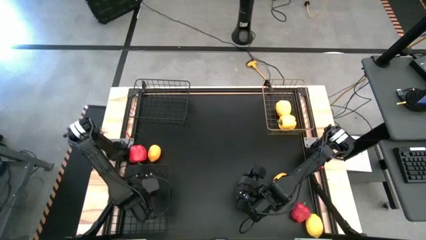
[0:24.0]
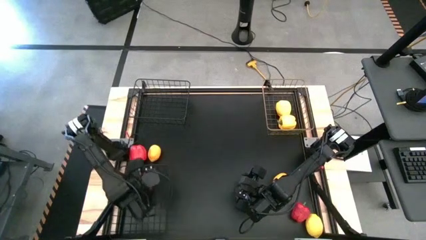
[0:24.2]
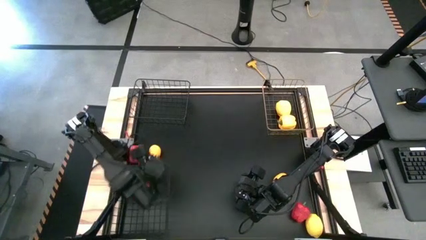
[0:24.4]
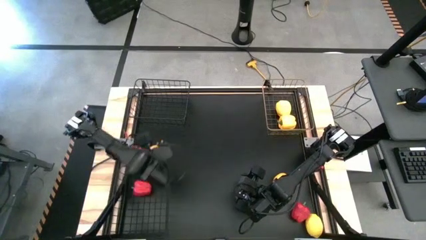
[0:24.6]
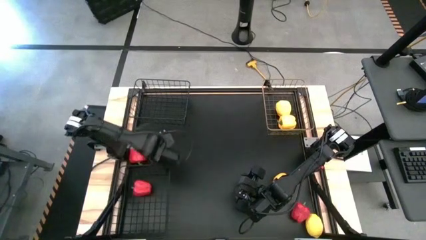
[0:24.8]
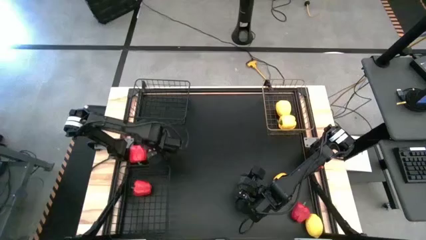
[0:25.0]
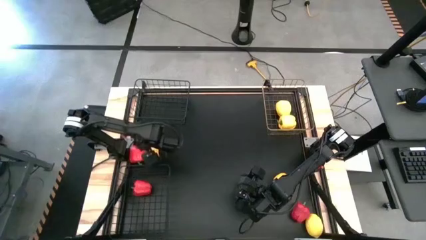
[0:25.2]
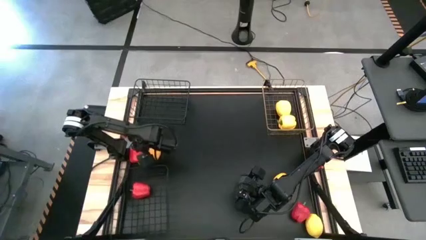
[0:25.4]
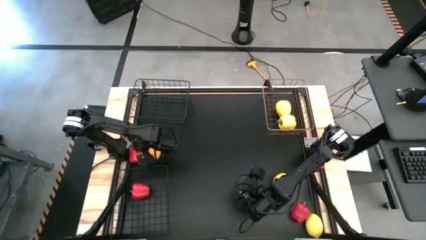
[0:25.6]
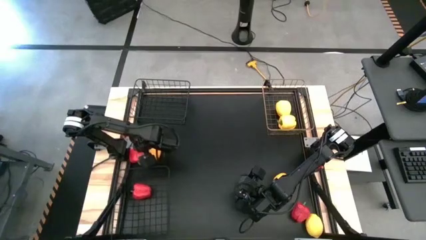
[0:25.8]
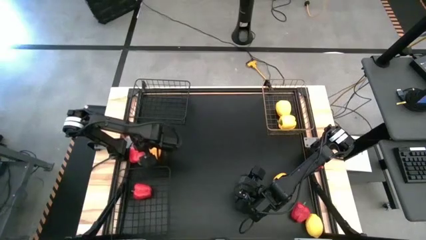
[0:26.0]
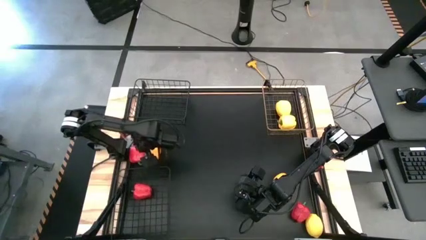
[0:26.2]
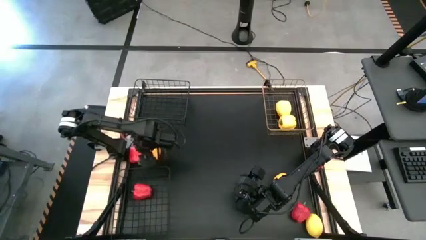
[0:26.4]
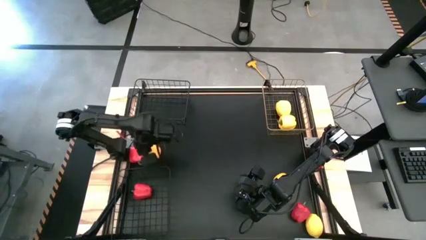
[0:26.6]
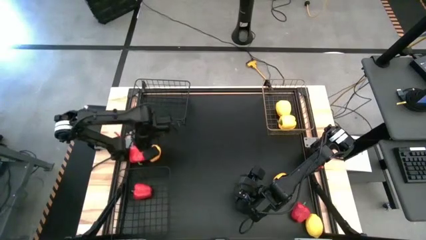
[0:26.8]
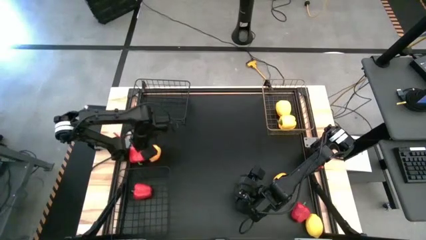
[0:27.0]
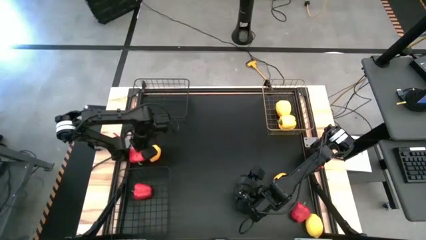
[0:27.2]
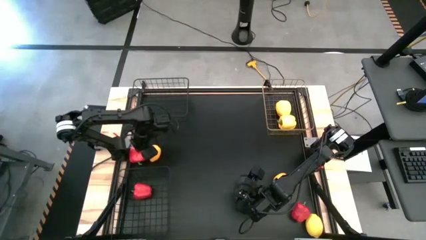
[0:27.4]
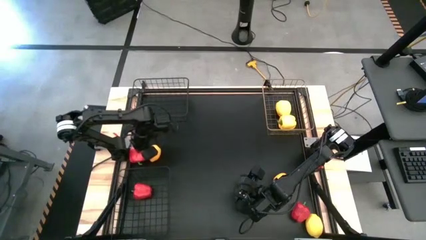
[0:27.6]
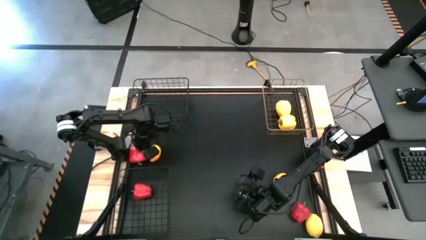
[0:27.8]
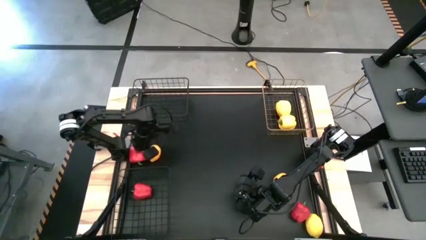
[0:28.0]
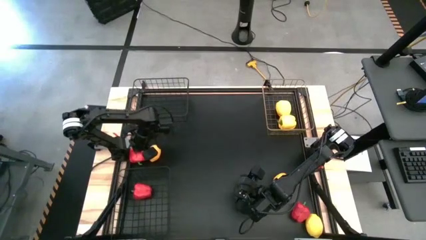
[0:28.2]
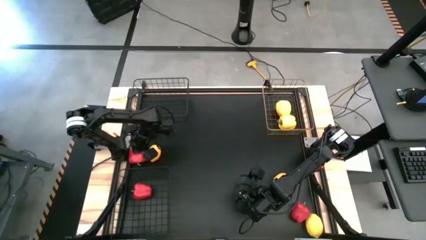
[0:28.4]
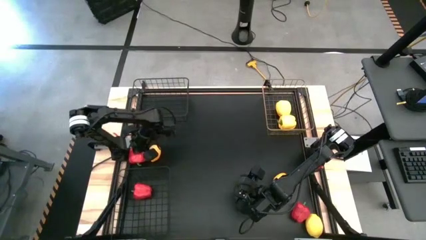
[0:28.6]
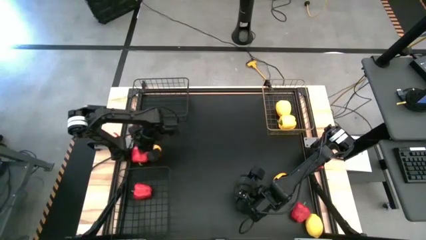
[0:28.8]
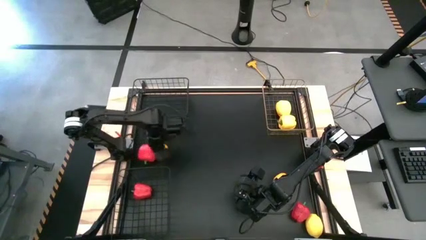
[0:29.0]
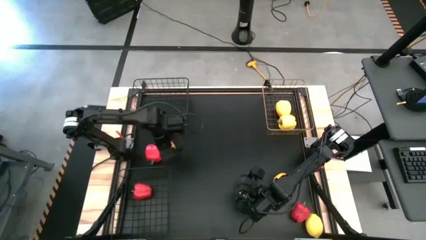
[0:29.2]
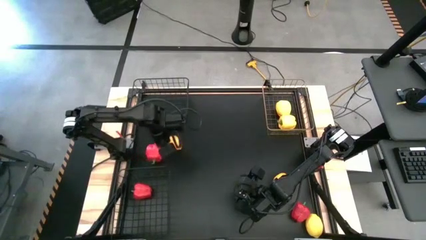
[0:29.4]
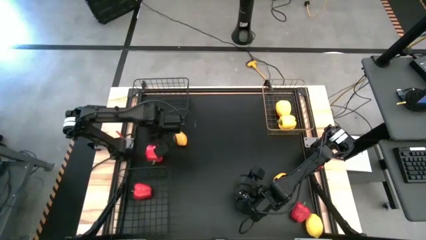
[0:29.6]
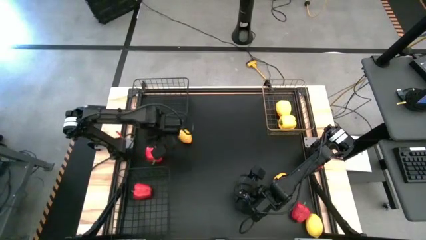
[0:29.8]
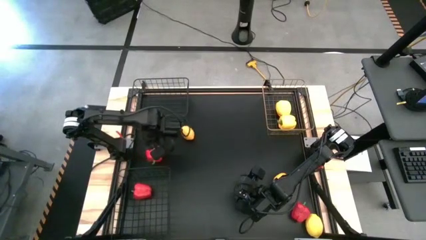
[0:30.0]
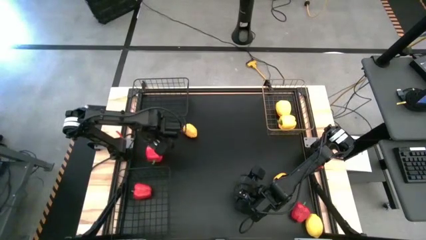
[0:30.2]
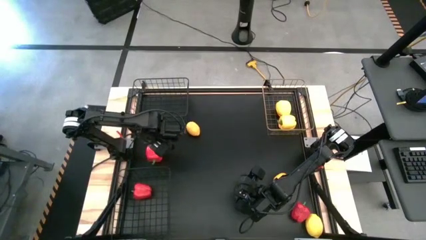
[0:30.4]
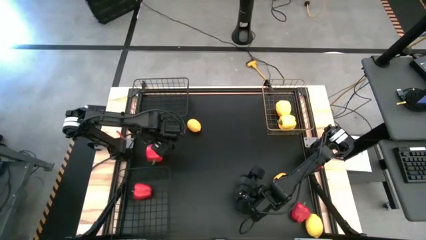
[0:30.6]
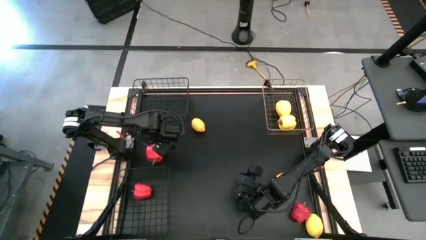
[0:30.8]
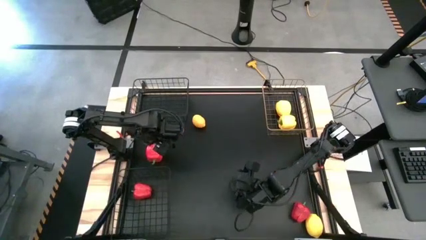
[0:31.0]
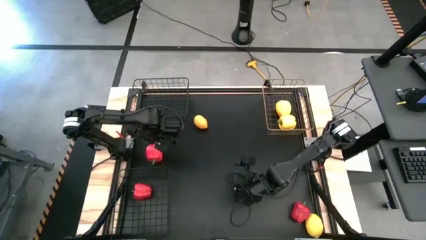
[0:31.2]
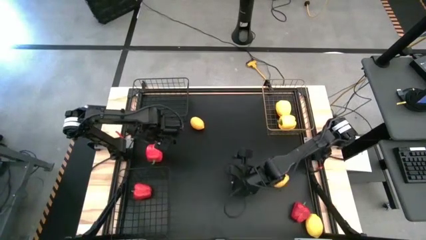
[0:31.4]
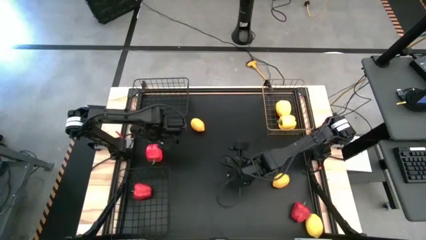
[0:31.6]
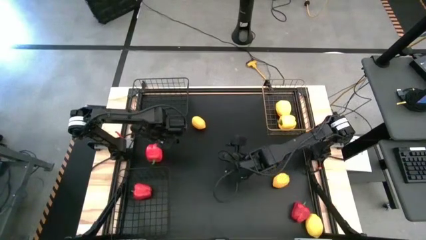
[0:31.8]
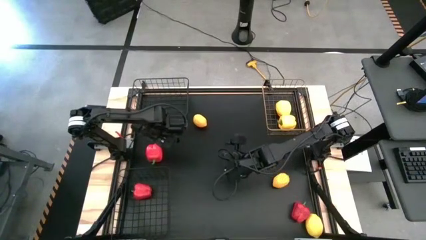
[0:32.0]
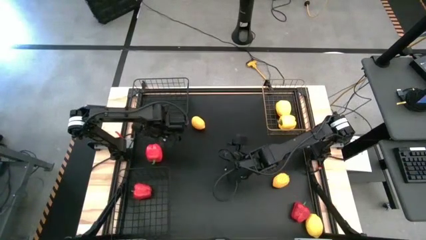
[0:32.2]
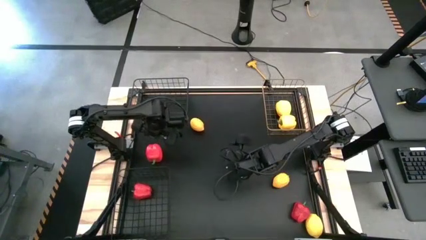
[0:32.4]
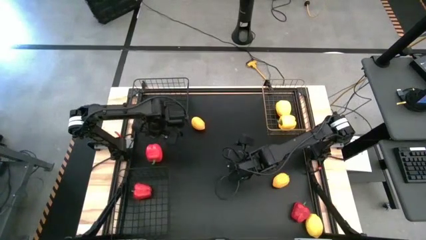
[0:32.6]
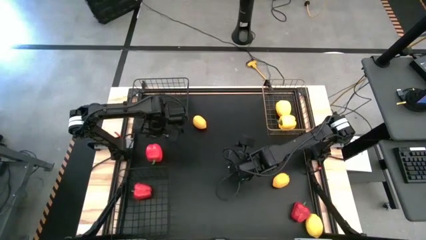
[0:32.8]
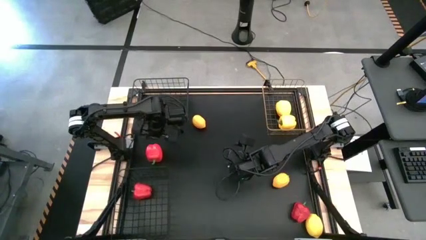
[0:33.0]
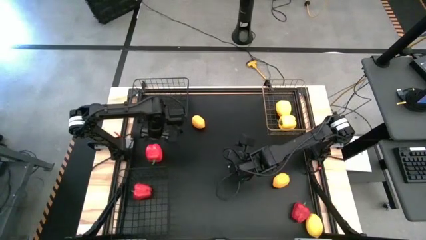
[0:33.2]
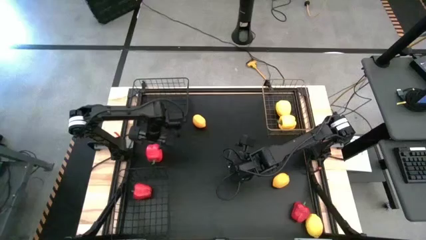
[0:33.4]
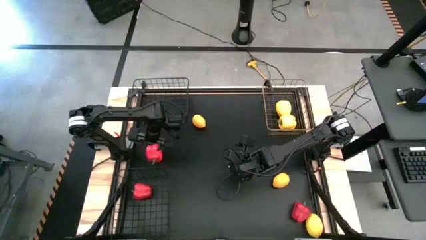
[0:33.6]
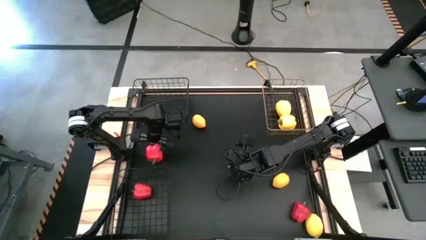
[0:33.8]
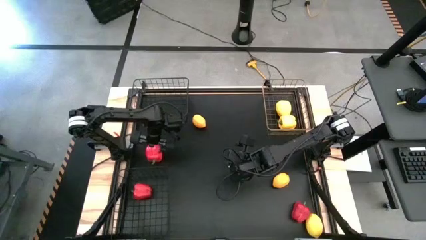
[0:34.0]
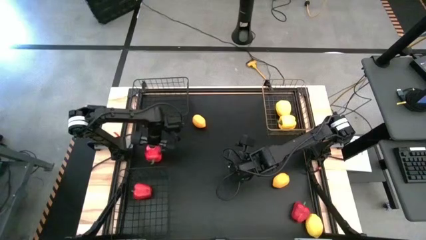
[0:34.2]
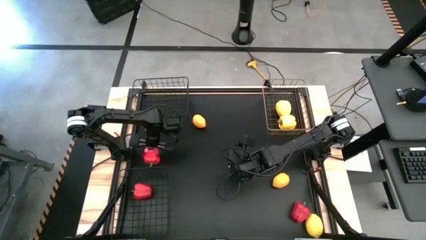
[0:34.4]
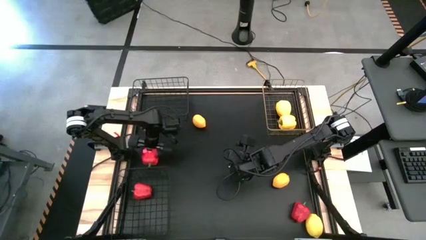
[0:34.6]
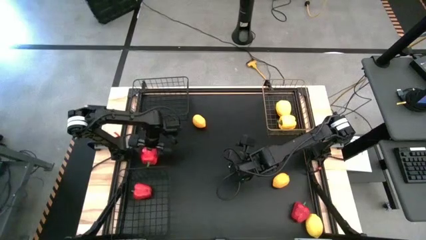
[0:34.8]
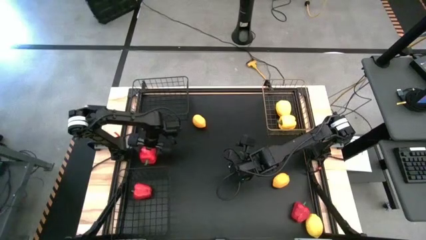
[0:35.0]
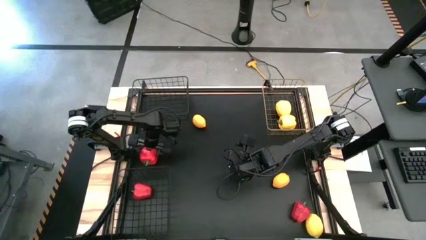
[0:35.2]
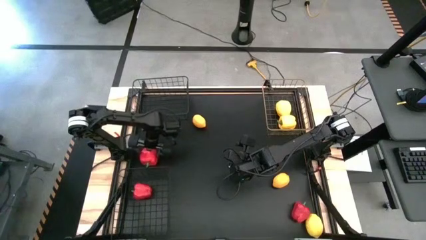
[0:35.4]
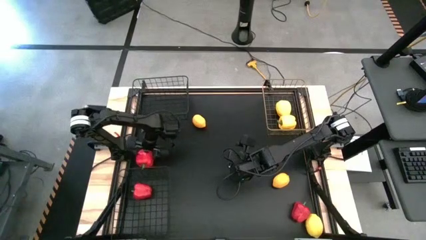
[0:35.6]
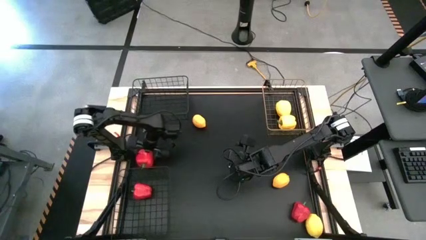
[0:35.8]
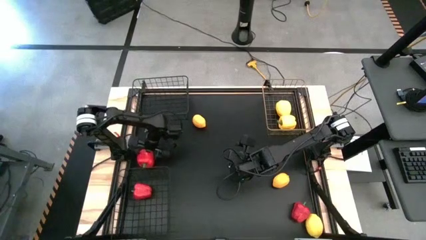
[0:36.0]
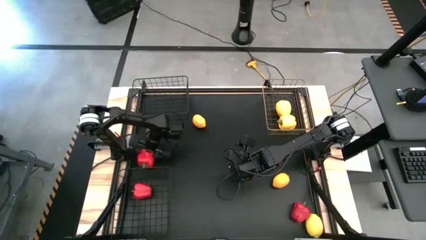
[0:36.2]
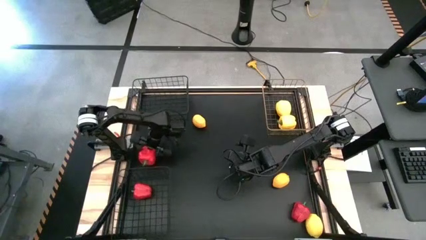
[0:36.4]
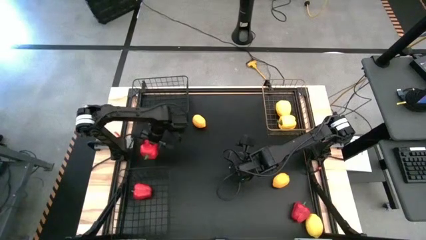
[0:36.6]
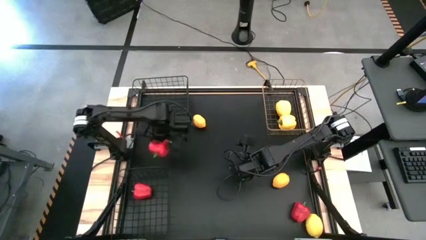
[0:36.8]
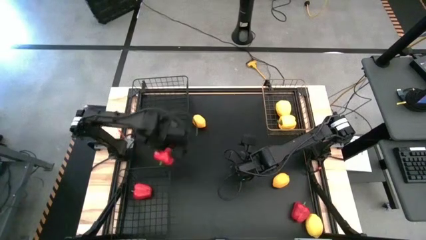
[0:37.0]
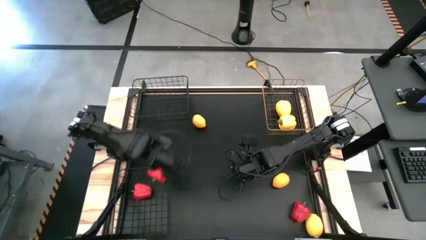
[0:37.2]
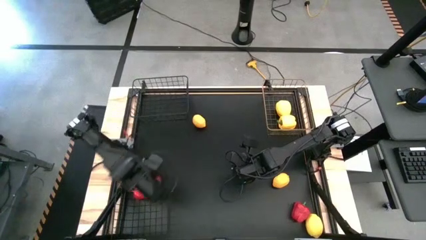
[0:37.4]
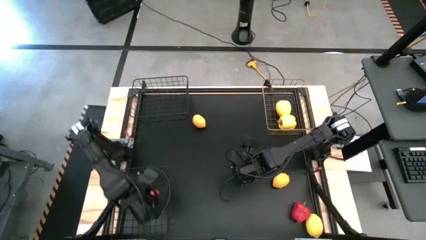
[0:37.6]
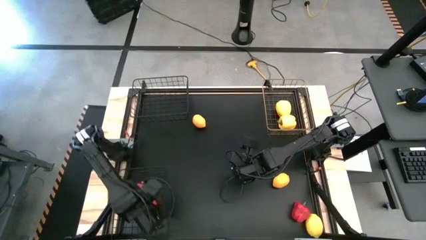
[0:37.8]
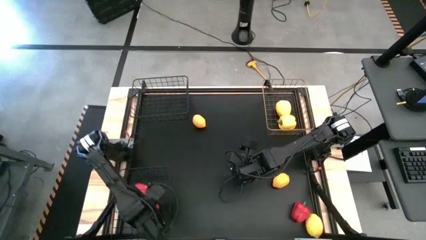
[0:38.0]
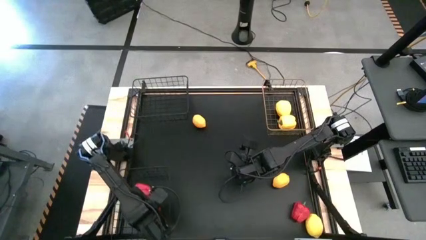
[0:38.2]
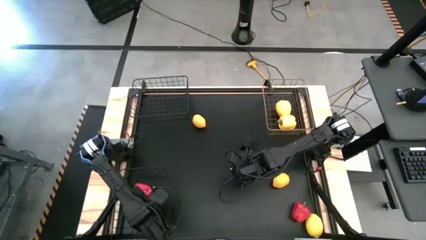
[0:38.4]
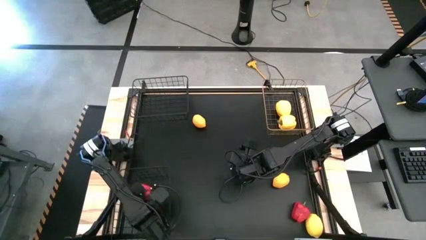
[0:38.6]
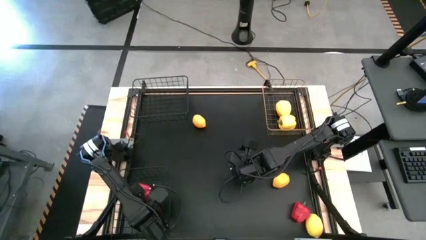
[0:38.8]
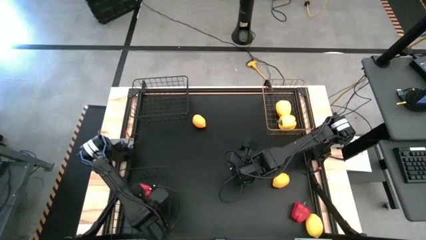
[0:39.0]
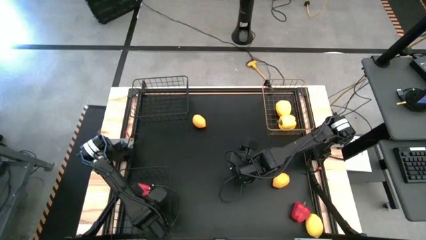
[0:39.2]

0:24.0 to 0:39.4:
Task: Sort produce into baskets
Put the top red bell pepper into the bottom black wire basket
